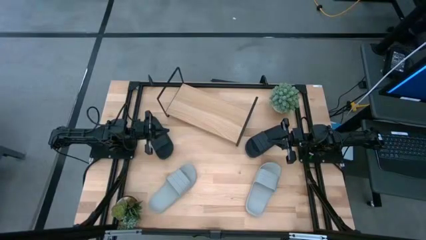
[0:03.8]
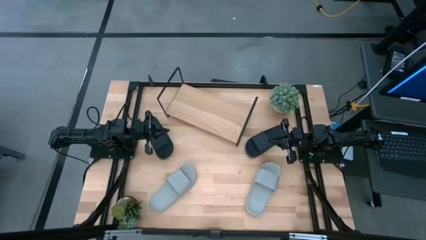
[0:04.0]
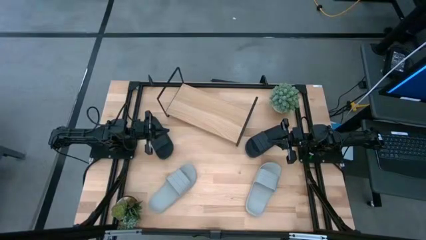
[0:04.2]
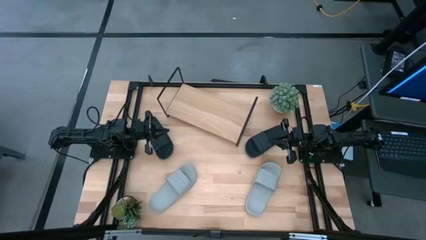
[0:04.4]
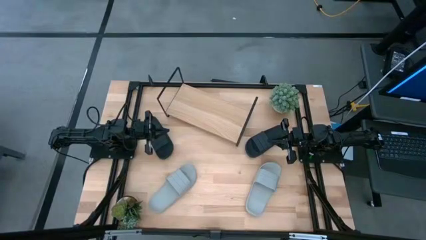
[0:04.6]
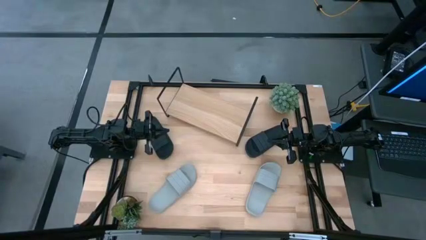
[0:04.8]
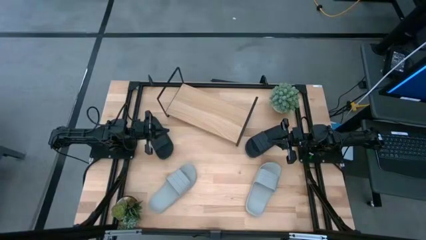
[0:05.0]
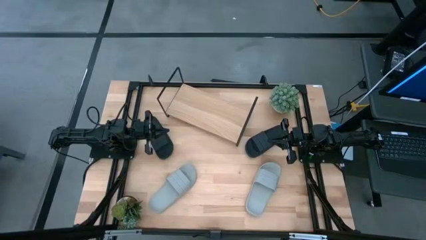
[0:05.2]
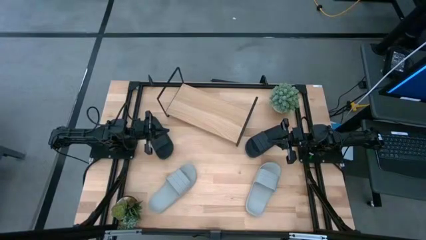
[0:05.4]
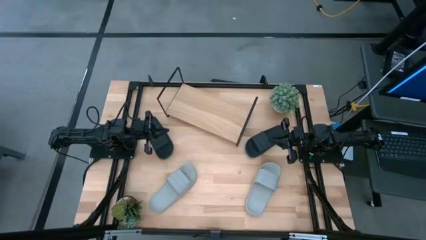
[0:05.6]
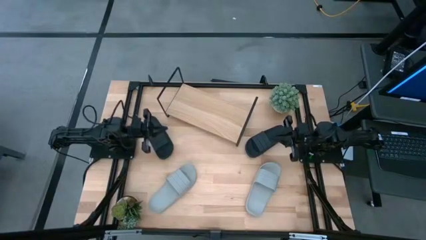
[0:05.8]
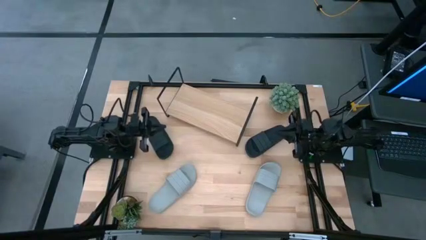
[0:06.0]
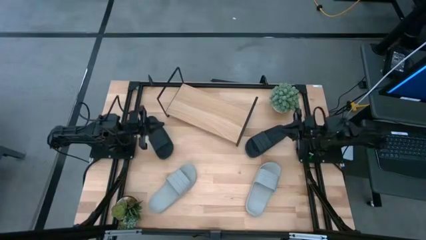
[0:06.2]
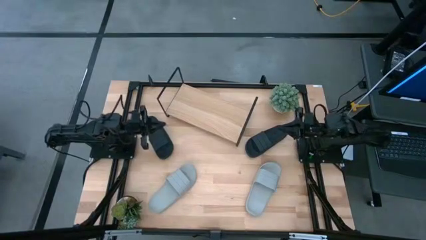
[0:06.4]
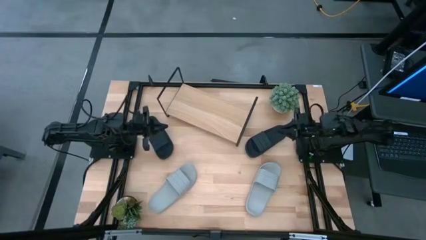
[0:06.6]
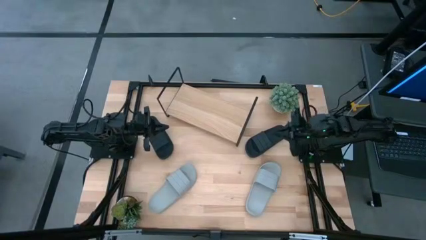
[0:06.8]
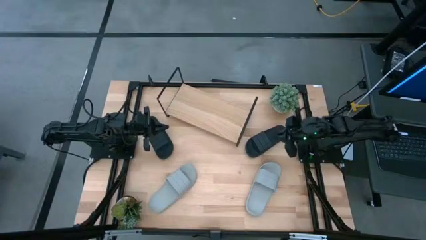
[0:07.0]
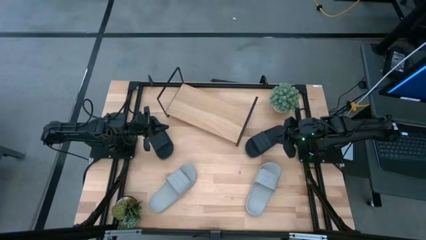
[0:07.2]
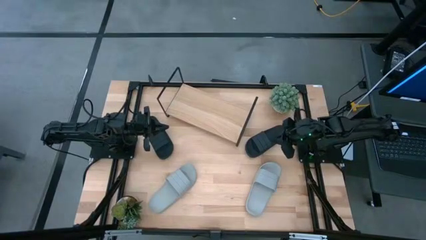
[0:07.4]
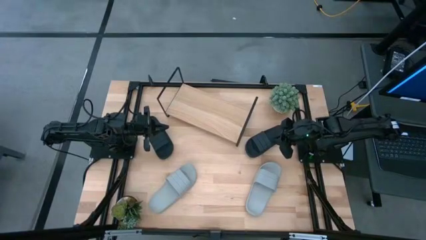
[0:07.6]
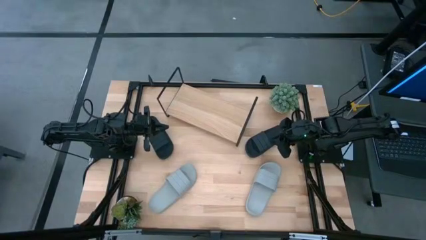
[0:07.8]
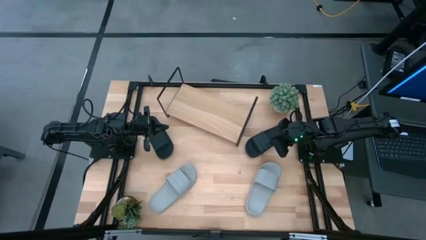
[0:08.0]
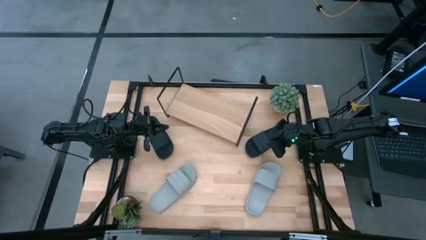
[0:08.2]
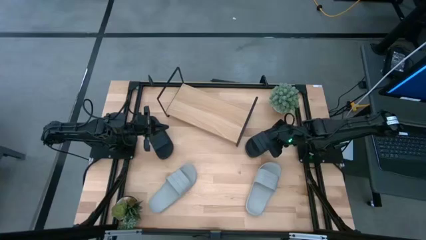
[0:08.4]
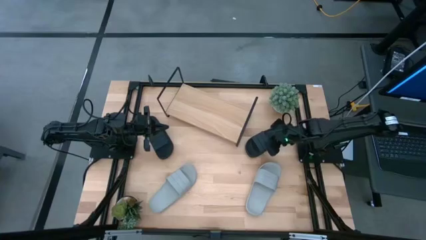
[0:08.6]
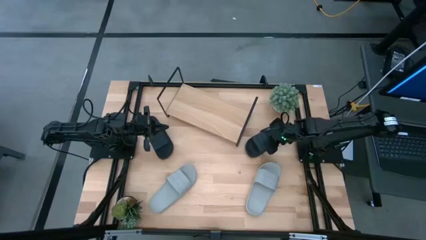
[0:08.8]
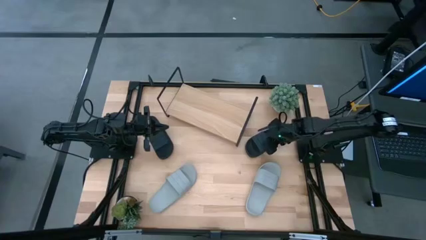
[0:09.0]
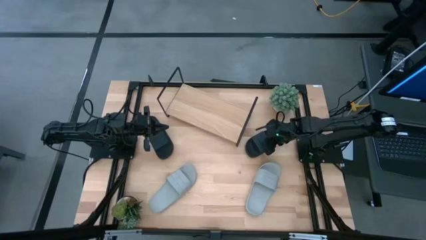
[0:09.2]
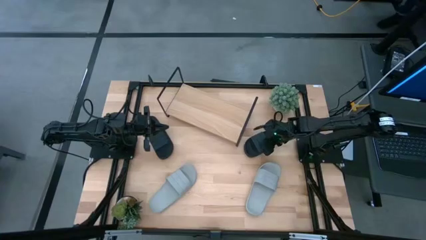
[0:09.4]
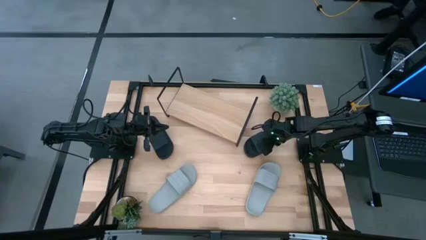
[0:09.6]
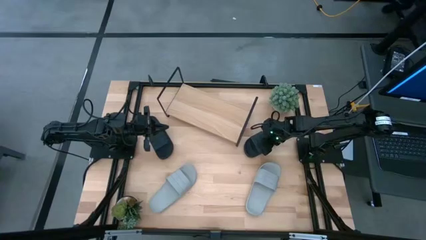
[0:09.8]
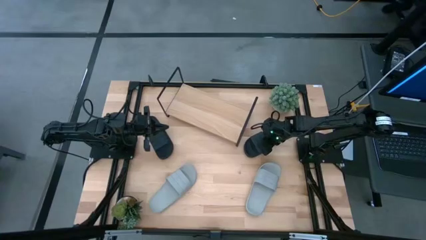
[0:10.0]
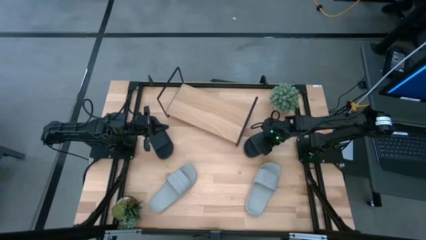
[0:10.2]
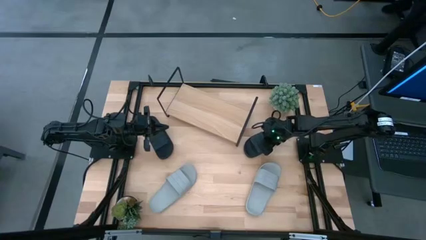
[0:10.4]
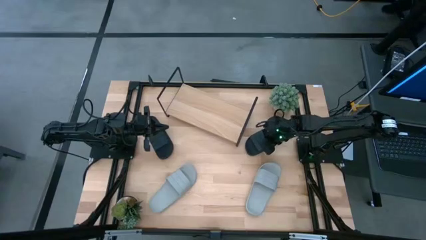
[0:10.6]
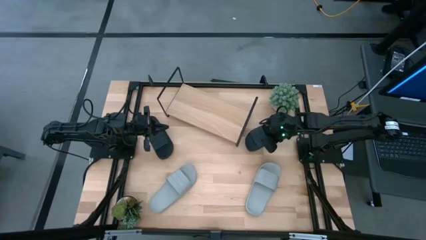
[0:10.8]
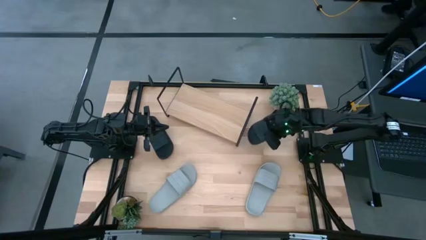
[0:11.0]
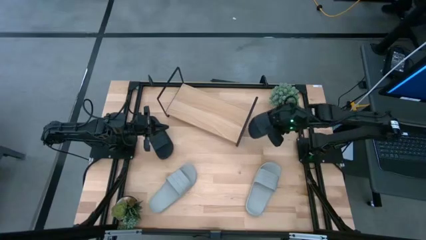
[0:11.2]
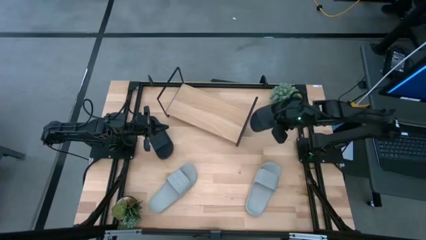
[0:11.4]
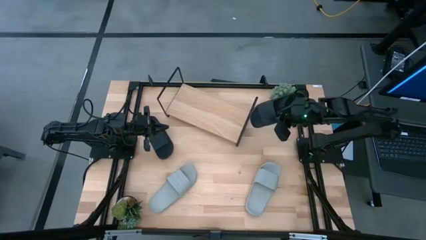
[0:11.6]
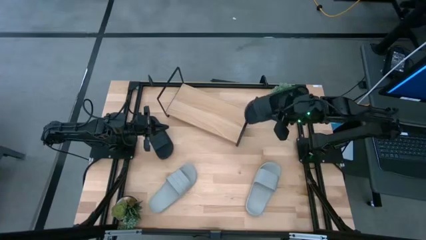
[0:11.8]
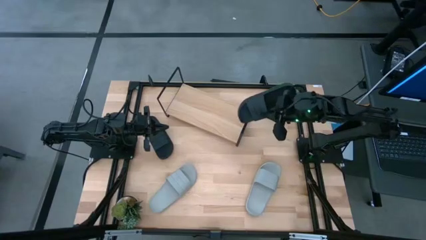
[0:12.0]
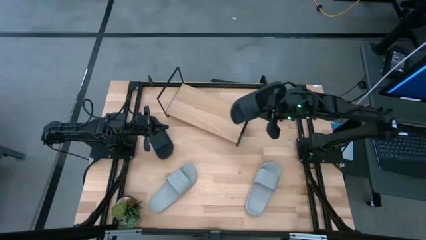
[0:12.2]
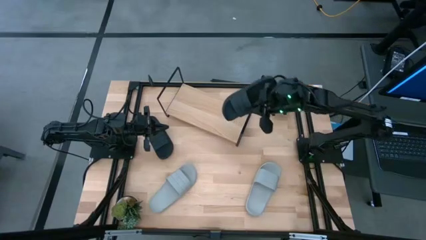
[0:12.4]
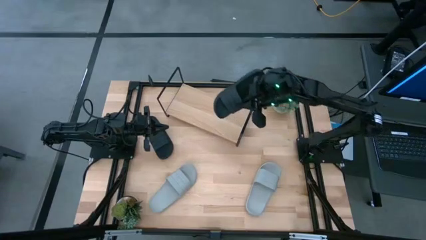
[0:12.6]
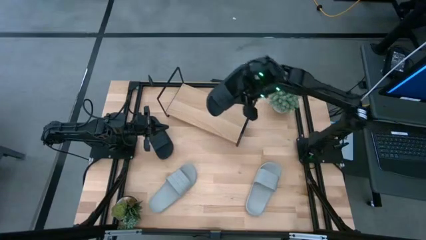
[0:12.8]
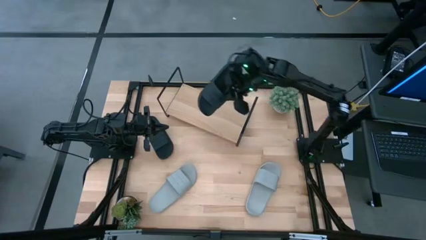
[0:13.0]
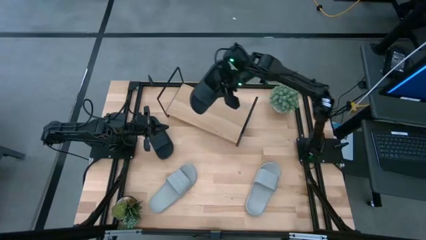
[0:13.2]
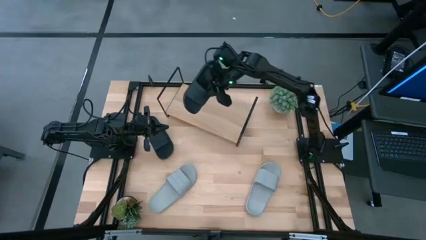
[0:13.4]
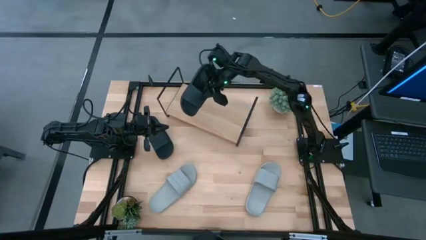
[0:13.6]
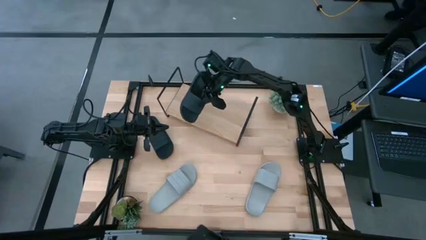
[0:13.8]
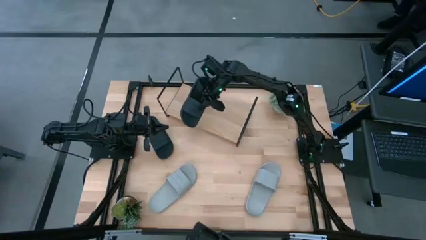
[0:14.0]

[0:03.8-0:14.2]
Task: Pick and place slides into the shelf
Put the right black slide on the shelf
